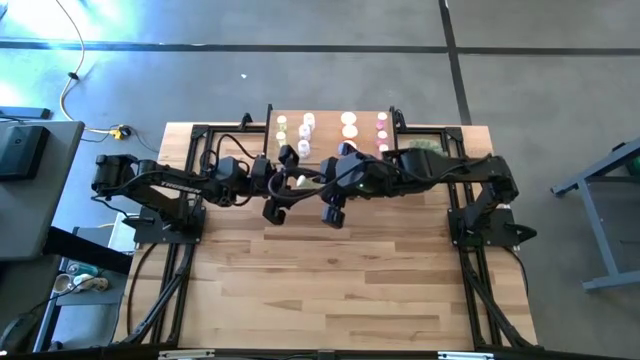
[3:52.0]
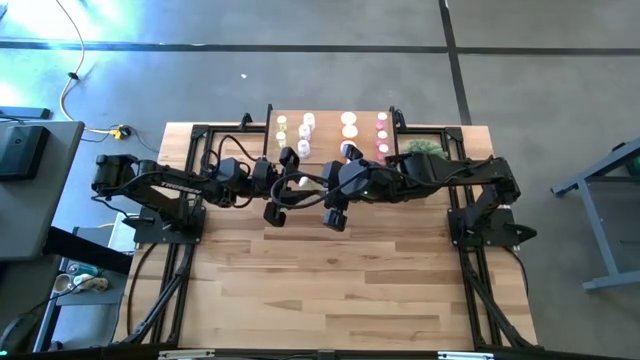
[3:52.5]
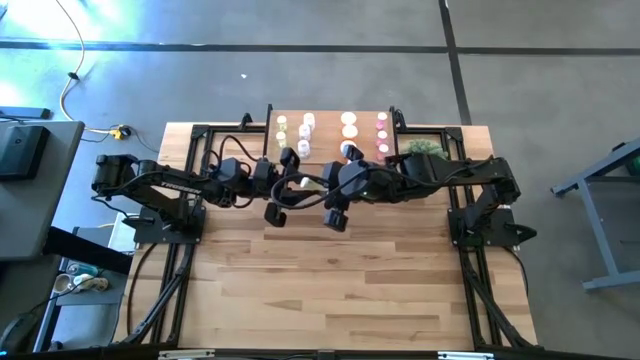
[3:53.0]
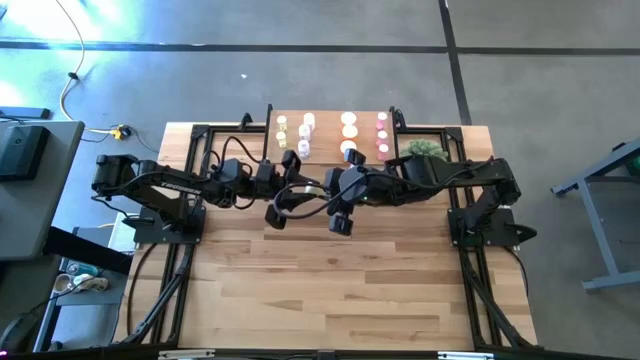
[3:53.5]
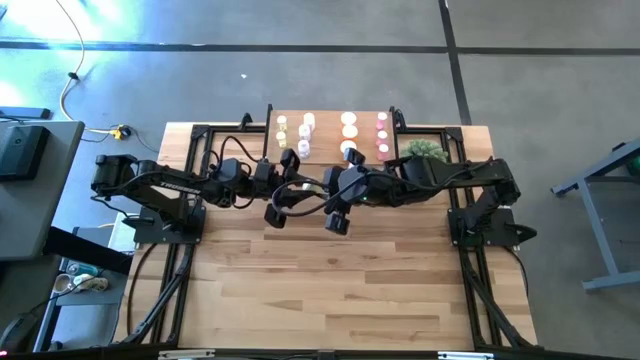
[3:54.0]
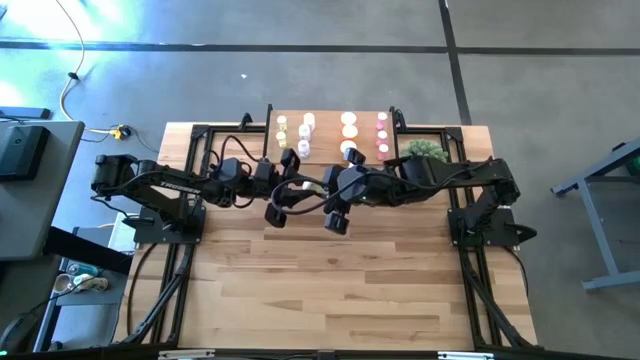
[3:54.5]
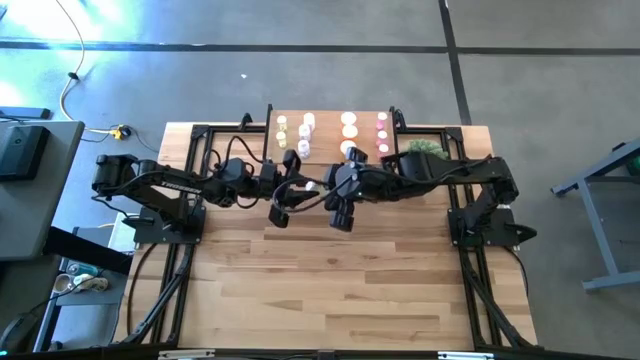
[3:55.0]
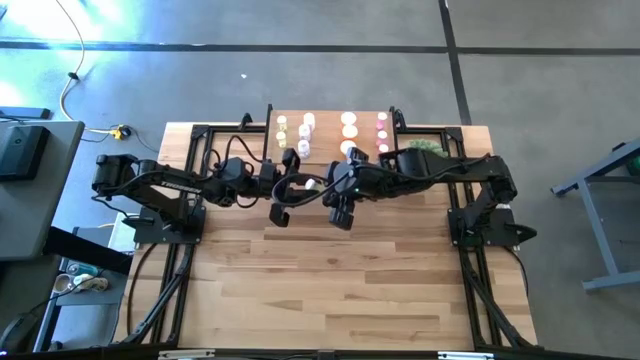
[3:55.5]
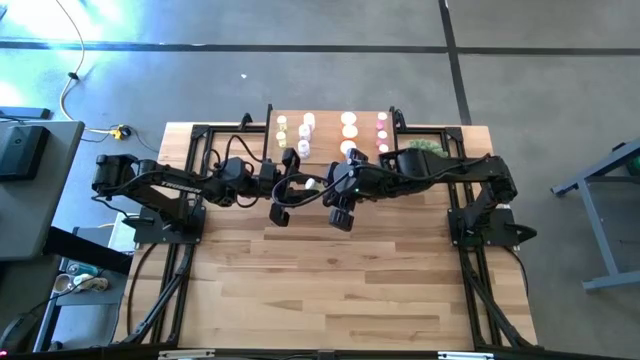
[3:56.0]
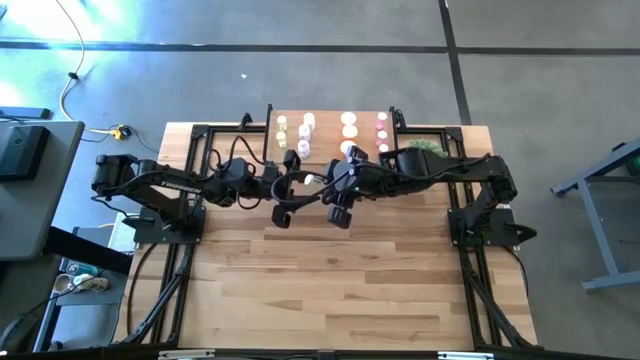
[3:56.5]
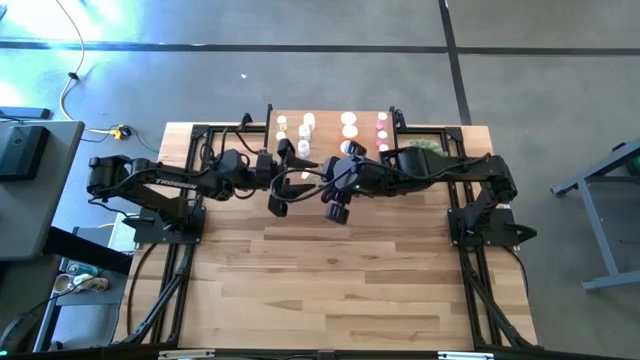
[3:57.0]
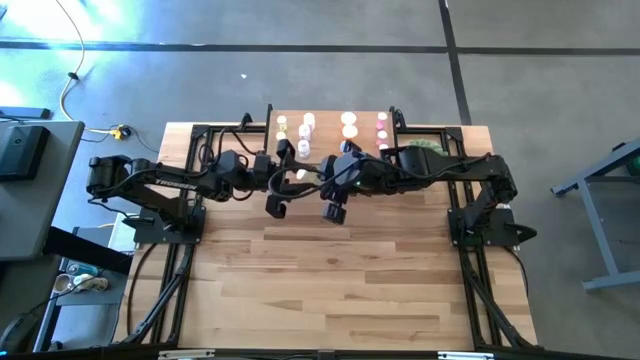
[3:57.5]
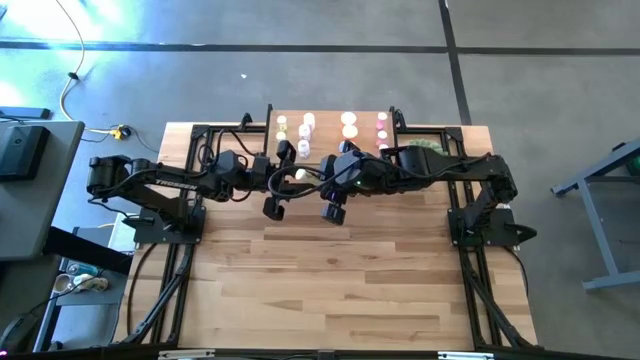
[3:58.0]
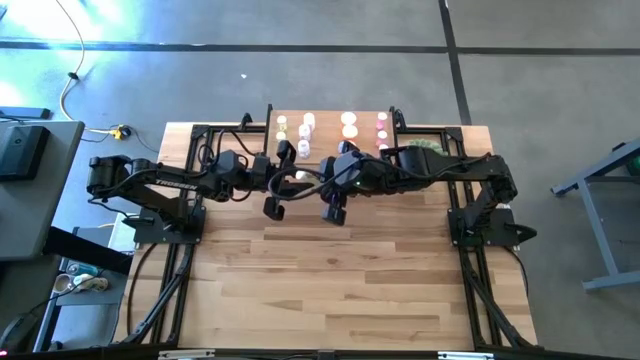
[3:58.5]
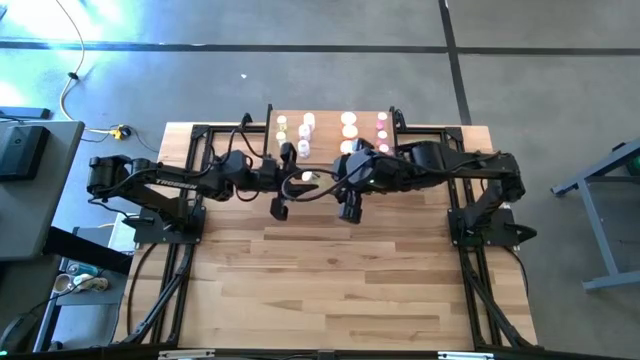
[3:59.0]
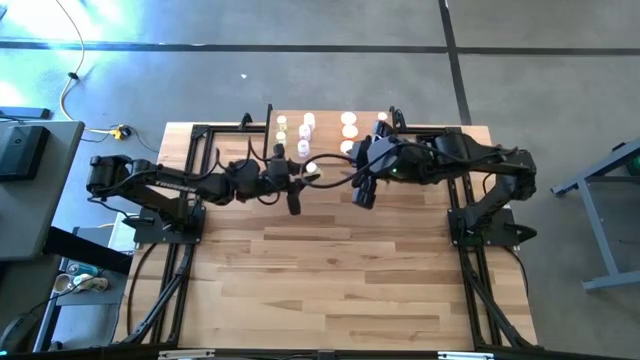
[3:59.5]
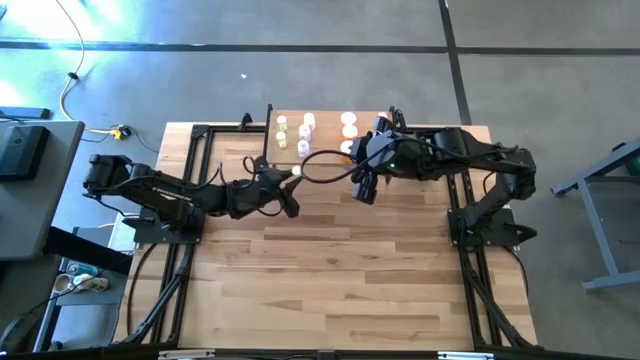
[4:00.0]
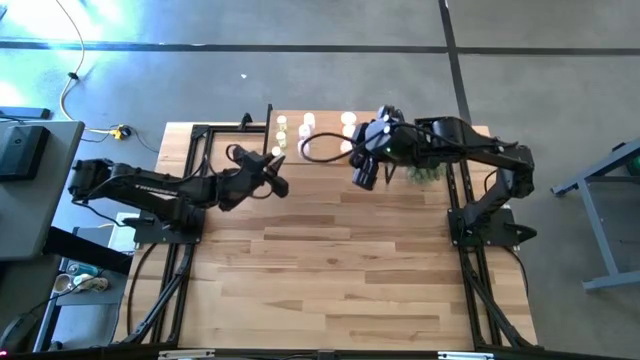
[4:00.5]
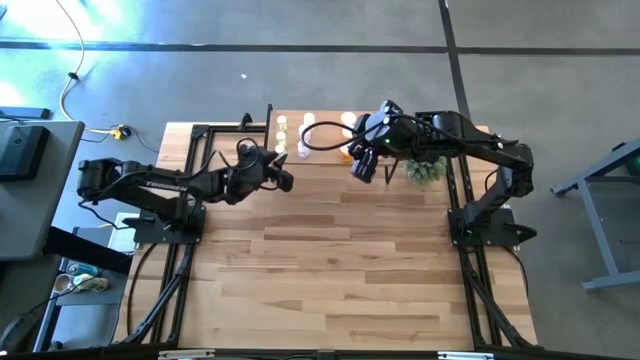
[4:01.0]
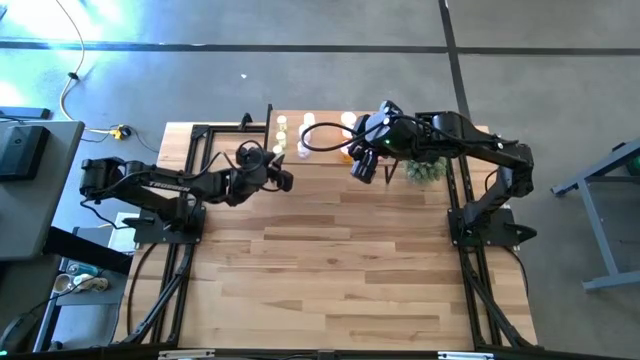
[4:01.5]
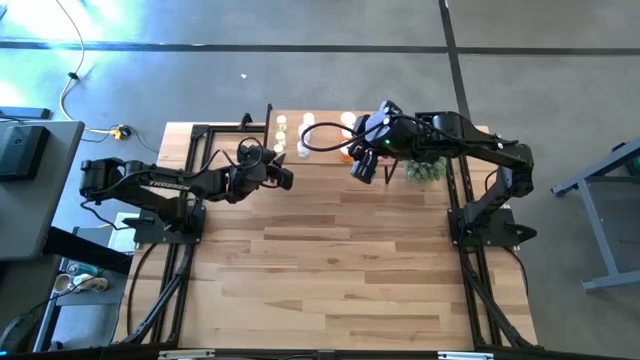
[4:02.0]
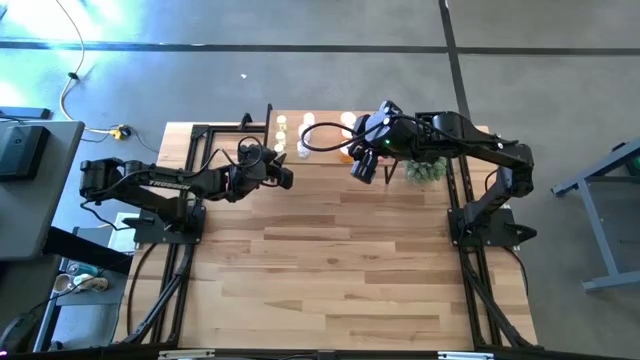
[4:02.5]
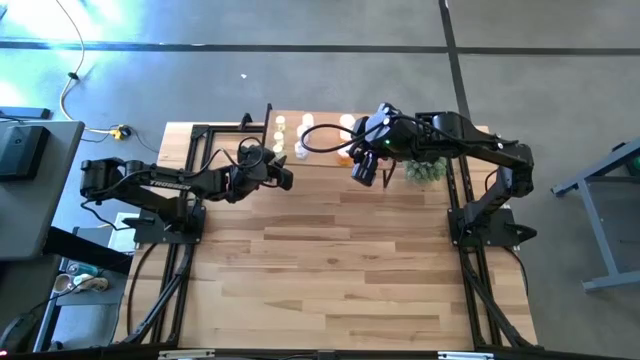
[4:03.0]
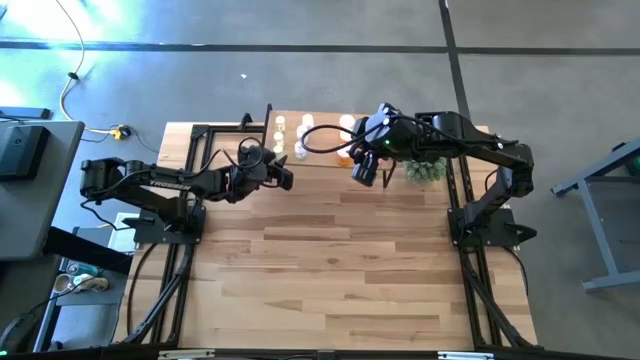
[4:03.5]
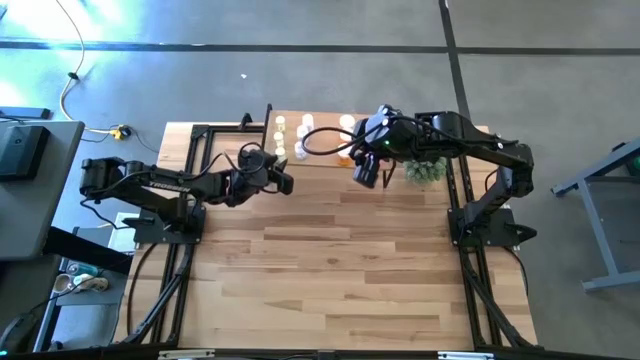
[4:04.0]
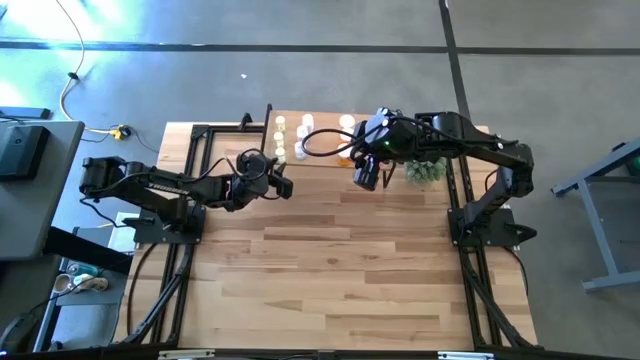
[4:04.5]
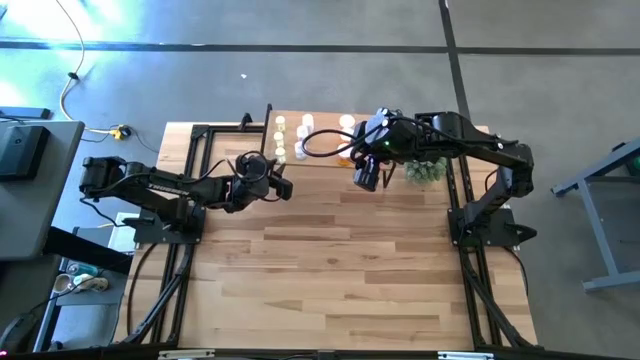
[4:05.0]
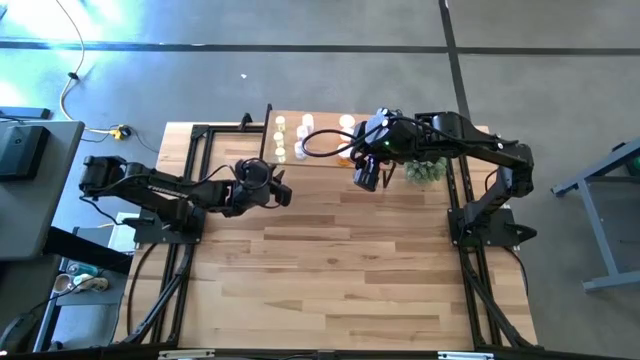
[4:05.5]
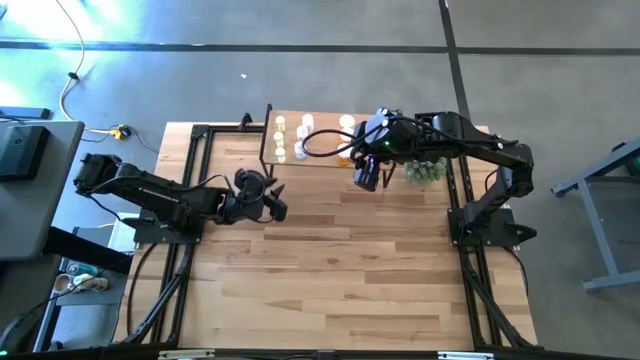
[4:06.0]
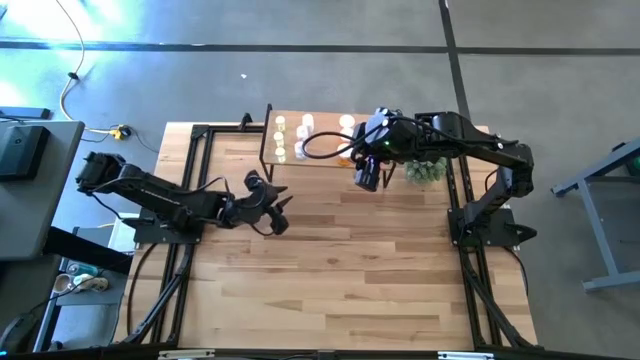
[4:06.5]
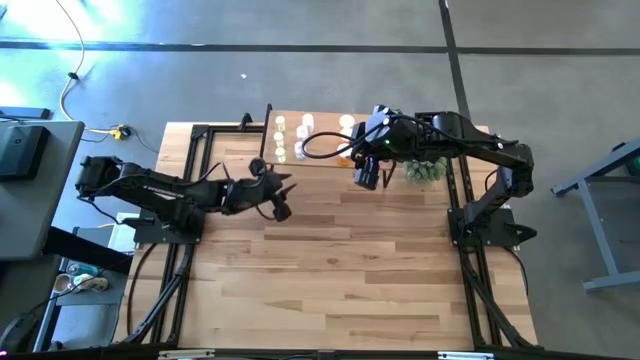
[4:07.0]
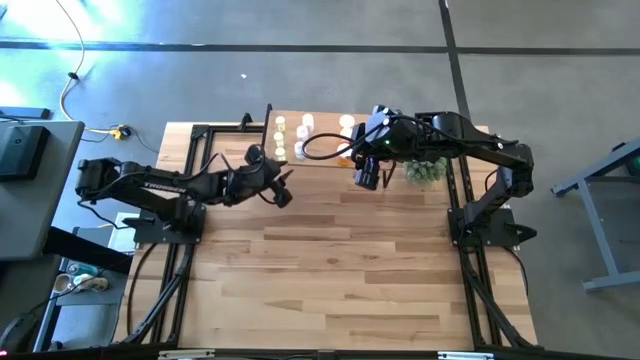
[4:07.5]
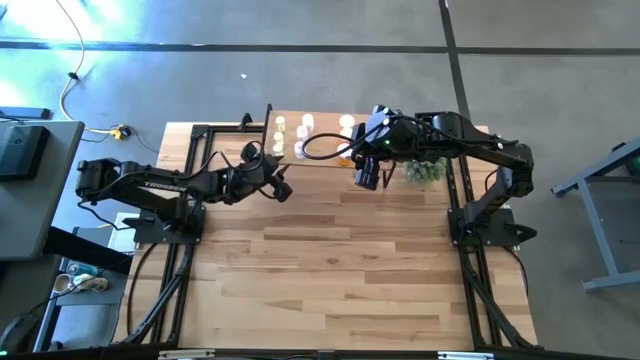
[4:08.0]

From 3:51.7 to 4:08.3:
Task: Pick and place medicine bottles onto shelf by color
Put the yellow pill bottle aligned with the other yellow pill bottle on the shelf

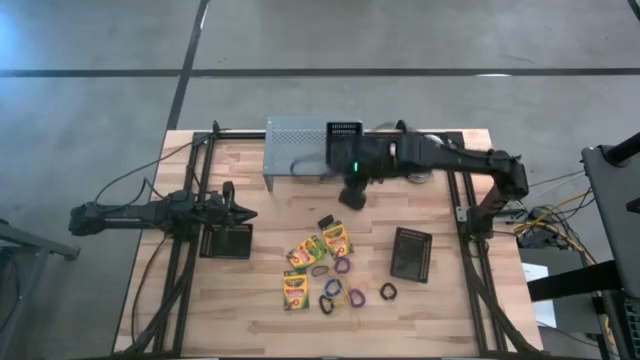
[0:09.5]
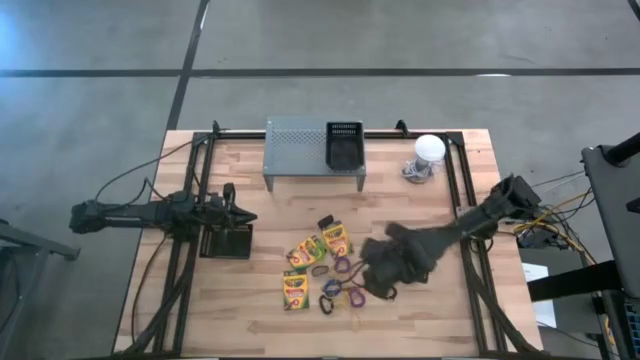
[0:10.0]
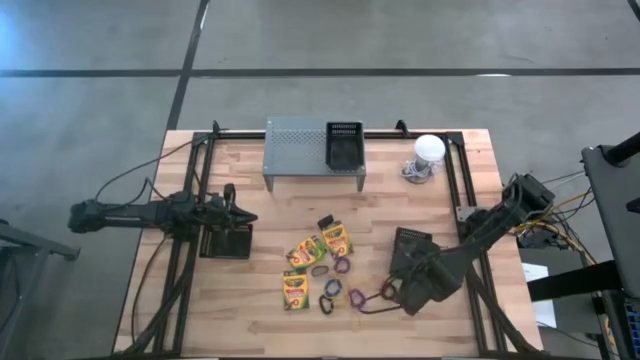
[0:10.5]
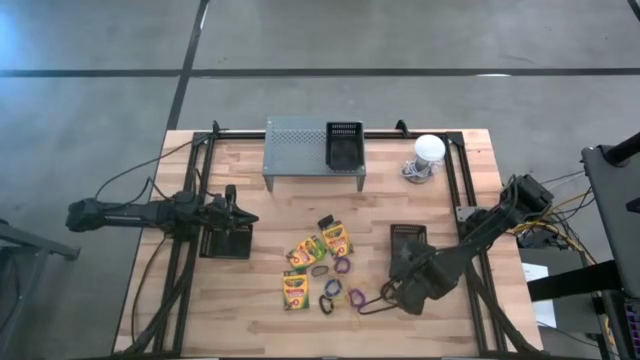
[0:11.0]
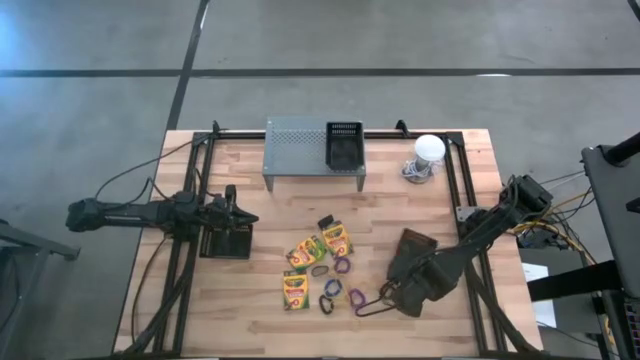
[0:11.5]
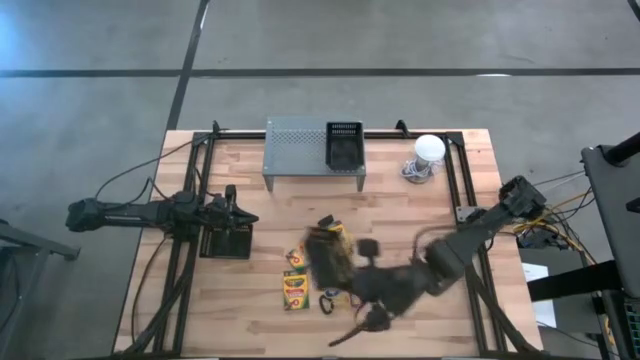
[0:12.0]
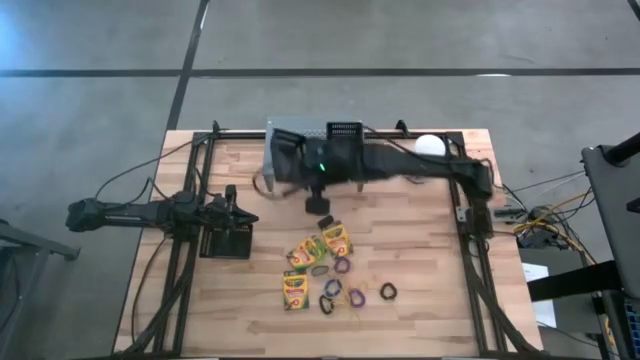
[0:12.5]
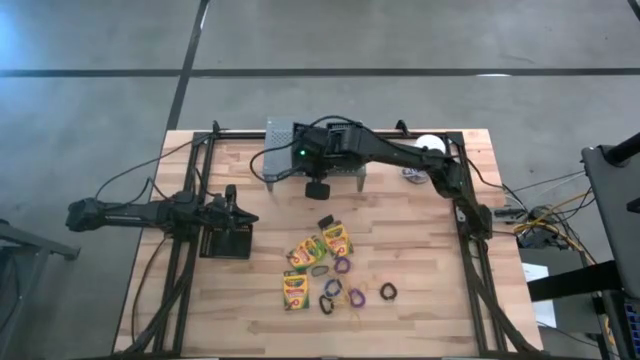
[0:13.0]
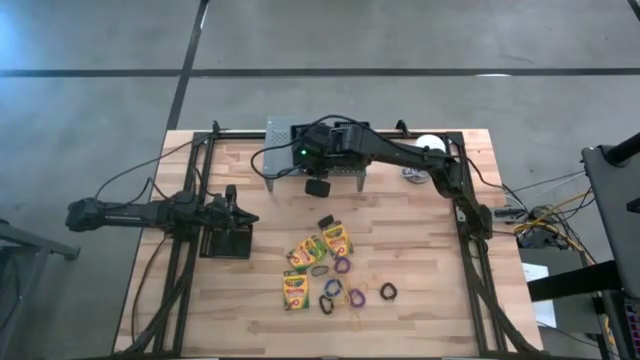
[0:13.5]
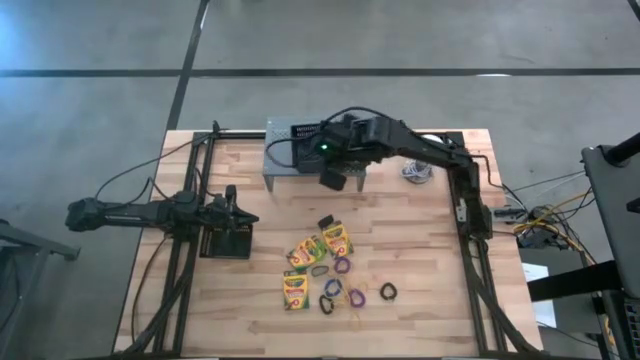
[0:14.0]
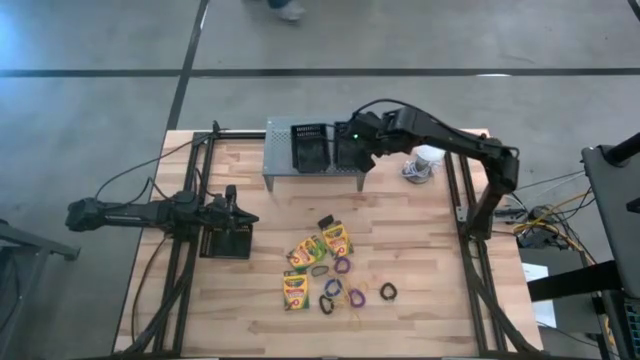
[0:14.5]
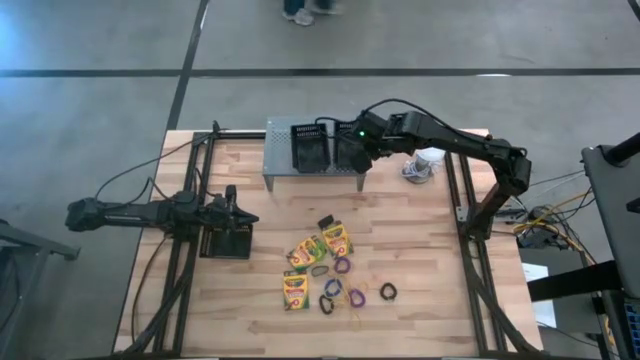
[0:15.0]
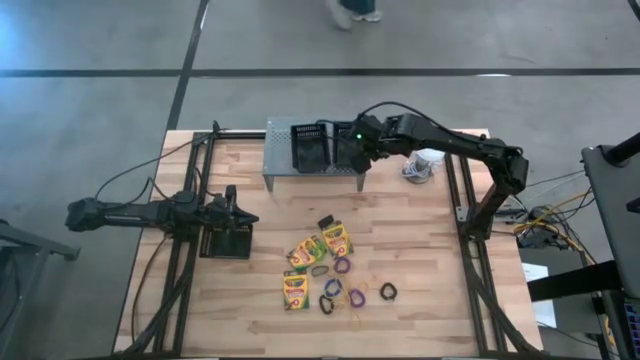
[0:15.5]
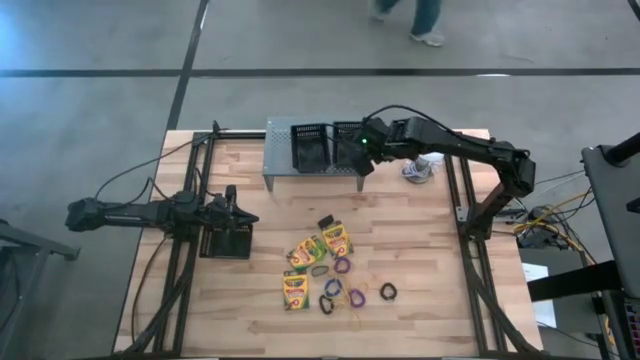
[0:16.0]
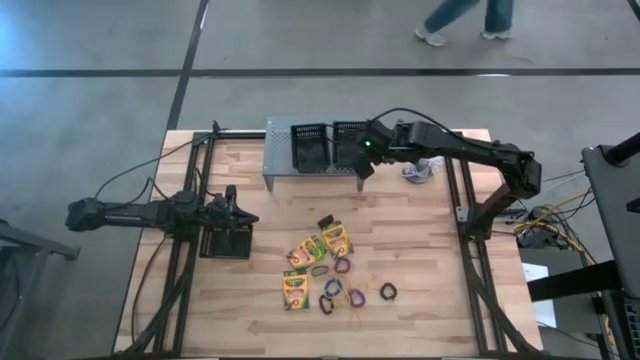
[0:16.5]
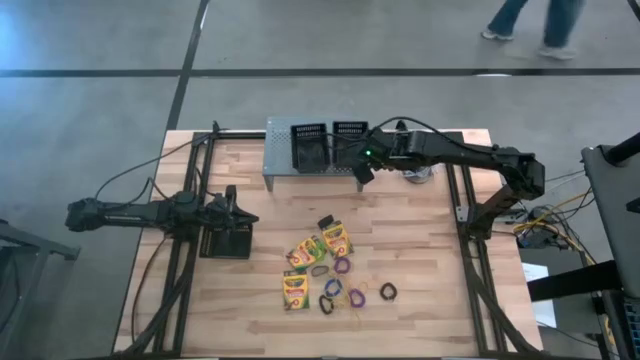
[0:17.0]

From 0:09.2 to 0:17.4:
Task: Pick & Place Office Desk Supplies
Put the right black bin on the shelf
